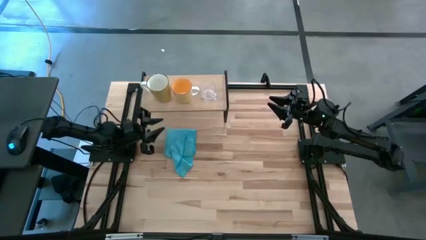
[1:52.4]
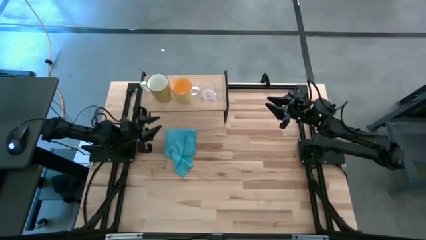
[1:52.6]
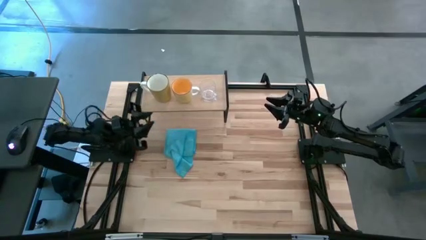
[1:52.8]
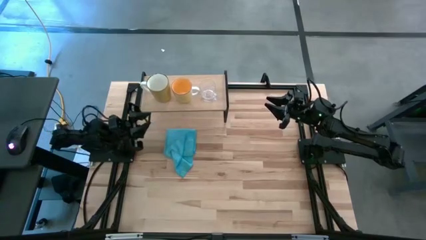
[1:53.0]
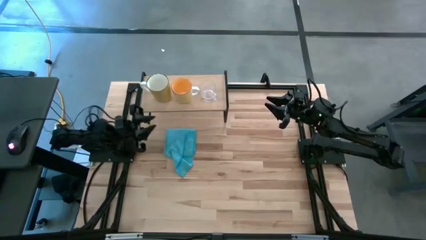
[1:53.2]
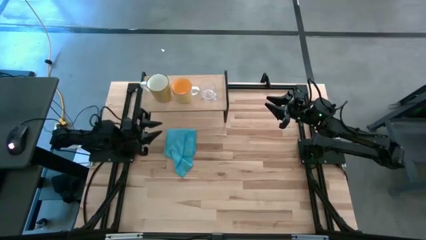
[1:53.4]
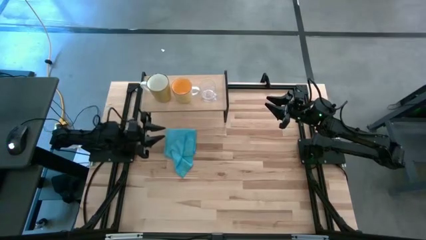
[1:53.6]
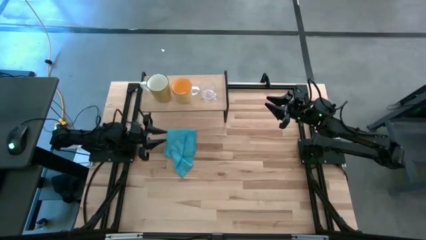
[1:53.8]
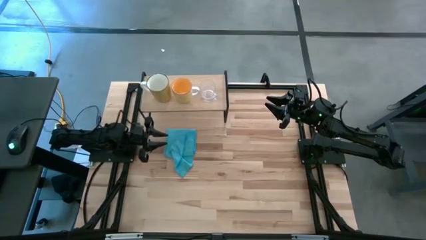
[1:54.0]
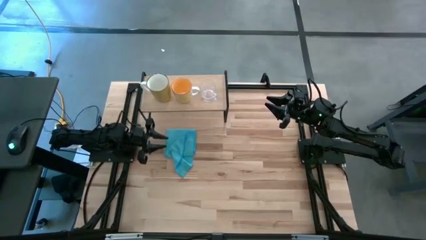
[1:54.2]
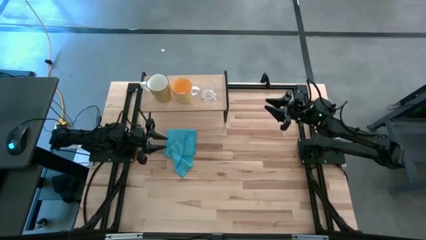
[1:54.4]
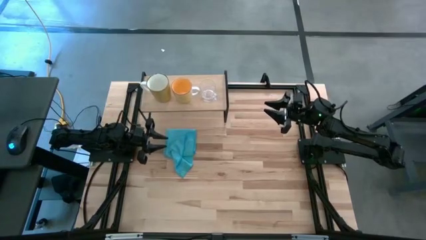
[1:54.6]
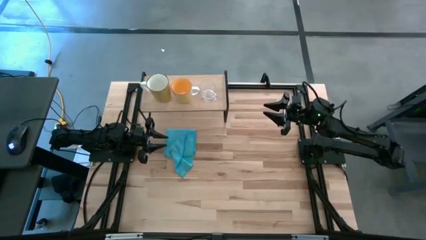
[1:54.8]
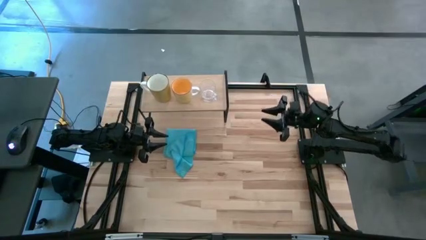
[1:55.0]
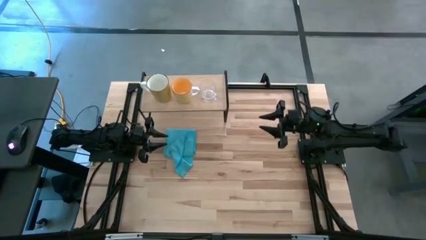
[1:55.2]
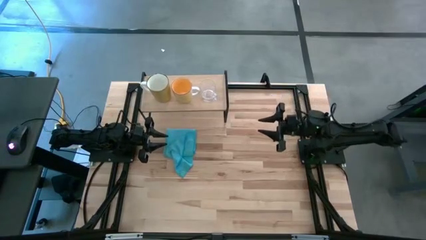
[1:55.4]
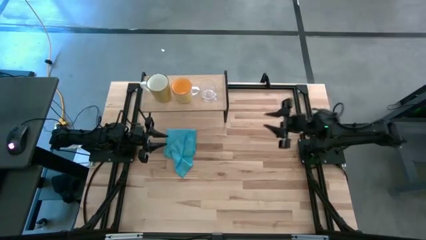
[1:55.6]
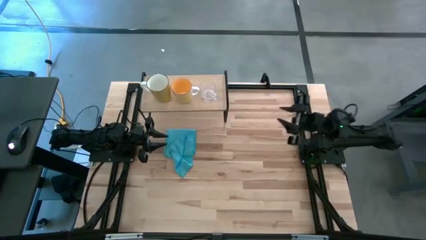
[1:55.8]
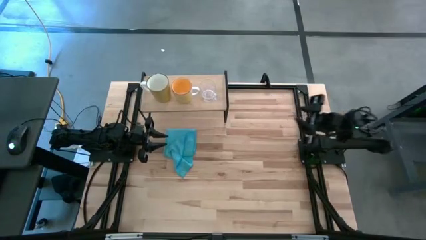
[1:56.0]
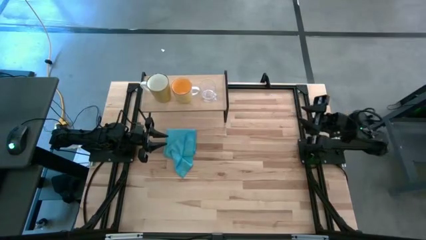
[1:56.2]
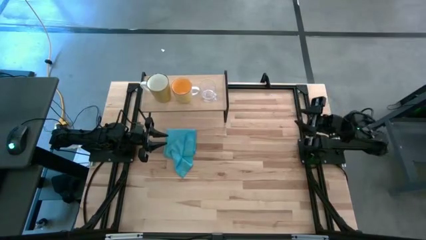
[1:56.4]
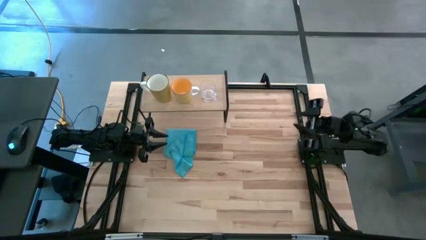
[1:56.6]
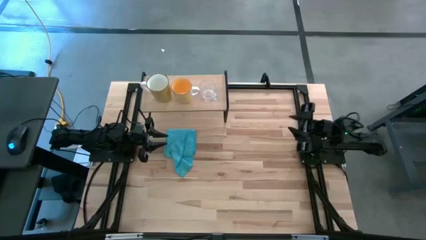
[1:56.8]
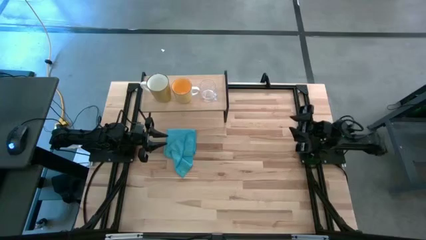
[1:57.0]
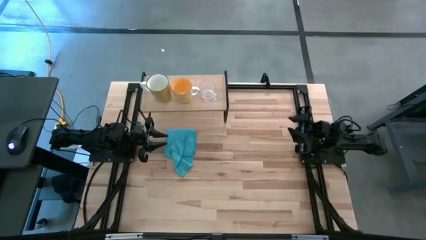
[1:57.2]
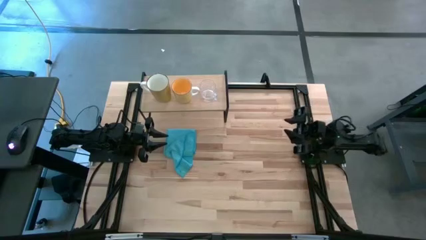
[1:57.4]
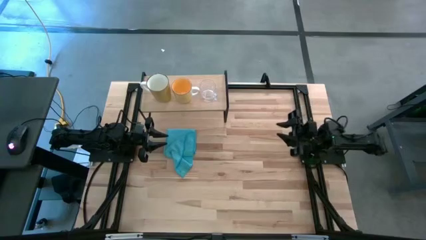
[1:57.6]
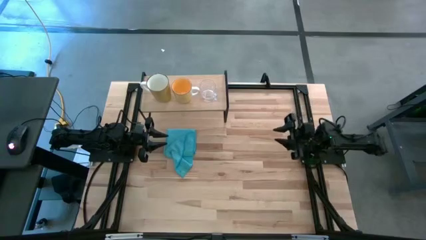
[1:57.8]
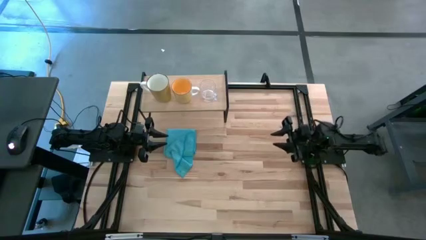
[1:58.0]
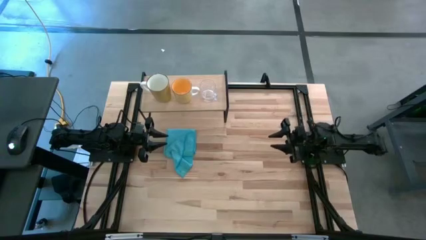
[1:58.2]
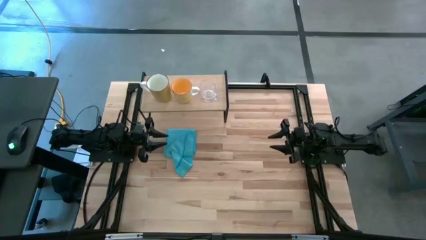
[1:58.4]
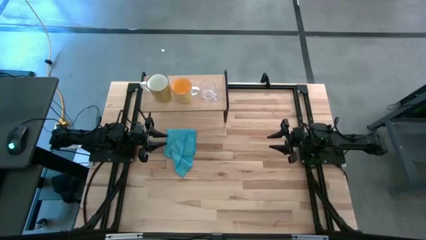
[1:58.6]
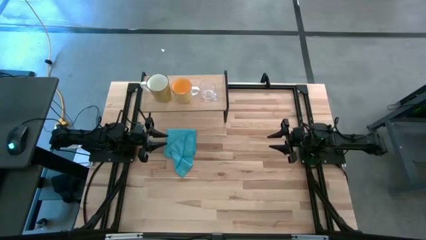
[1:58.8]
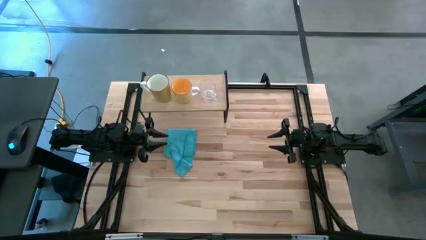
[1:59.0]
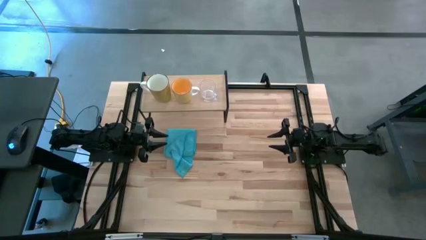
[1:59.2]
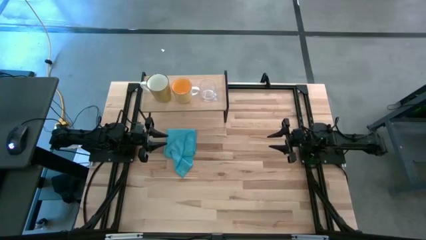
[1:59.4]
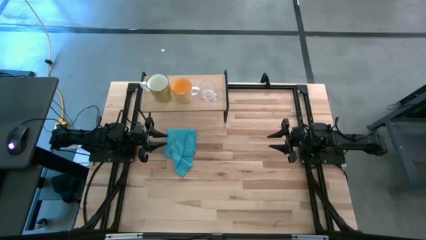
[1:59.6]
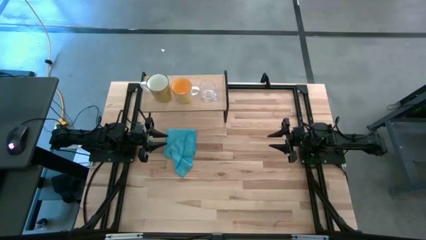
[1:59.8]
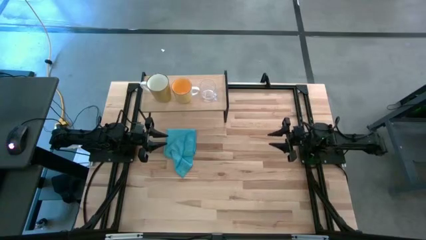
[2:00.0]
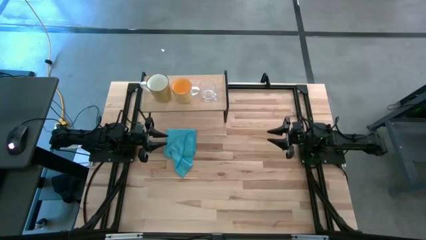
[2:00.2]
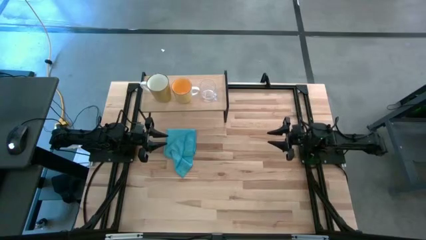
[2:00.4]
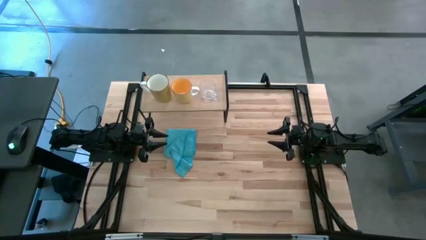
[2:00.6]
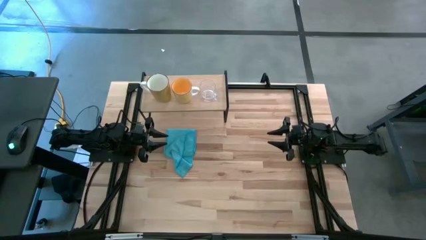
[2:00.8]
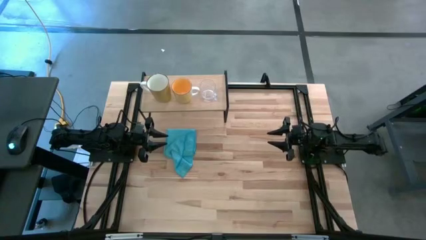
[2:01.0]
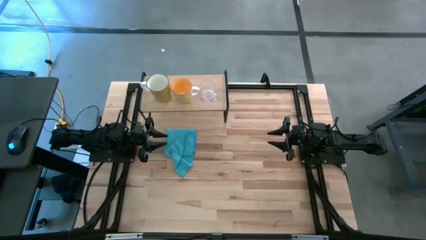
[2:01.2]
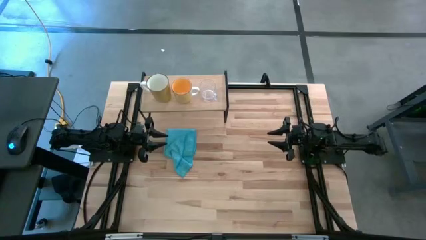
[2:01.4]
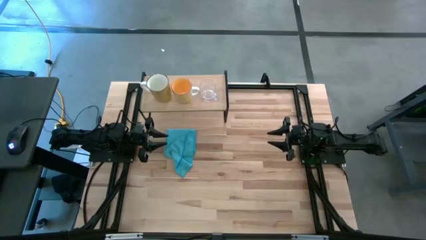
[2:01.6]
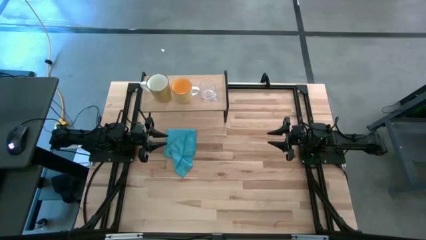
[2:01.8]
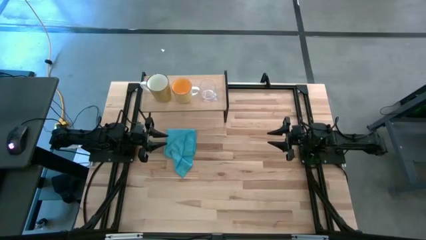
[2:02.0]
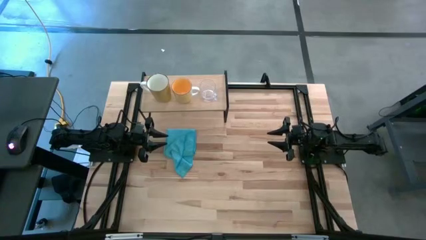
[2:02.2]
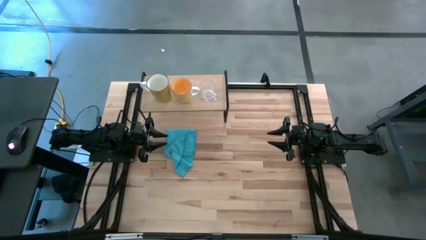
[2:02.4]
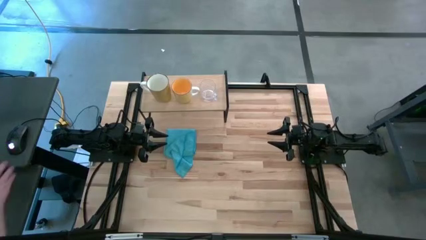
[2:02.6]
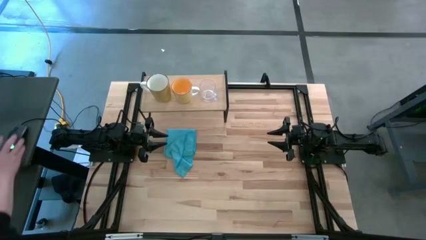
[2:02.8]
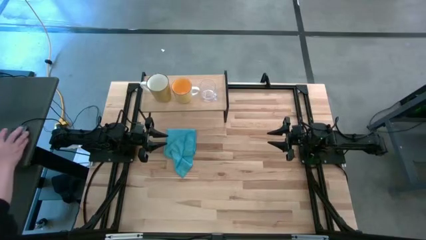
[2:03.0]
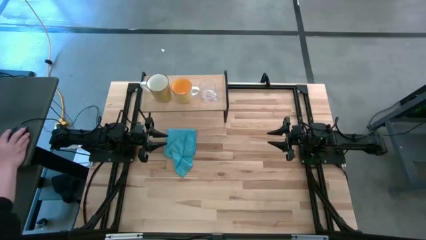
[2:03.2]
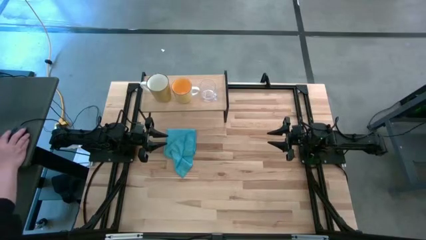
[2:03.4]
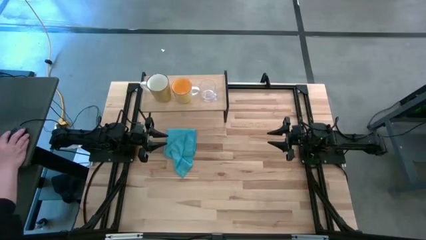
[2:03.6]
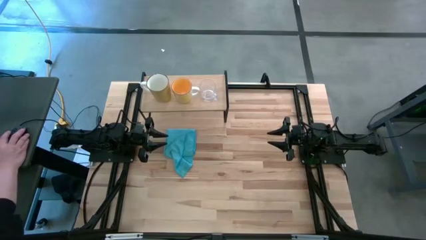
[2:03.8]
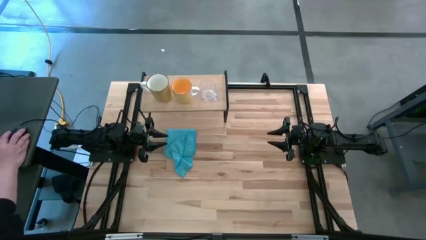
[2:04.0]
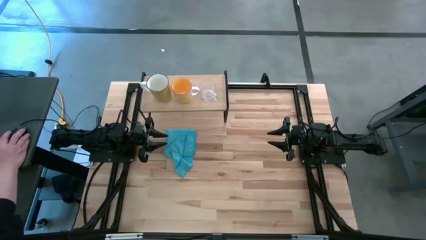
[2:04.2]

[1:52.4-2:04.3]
Task: Stack small to large cups/mugs on shelf
Return to Home Position

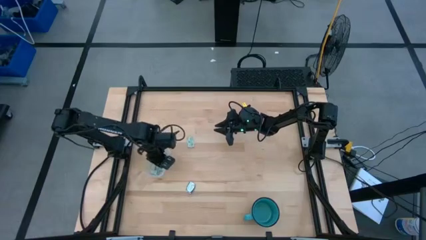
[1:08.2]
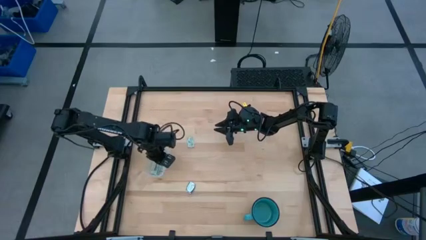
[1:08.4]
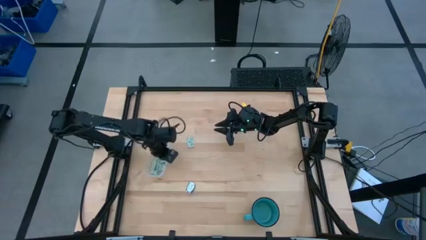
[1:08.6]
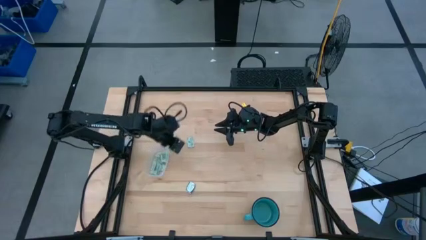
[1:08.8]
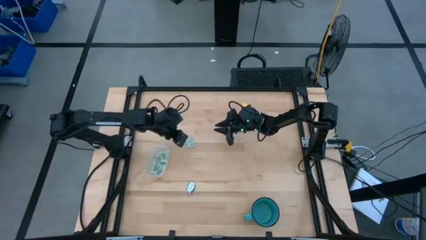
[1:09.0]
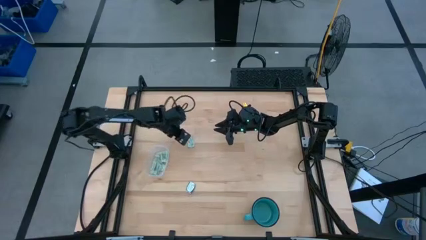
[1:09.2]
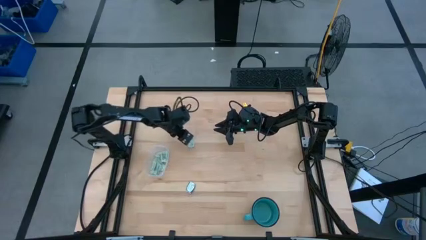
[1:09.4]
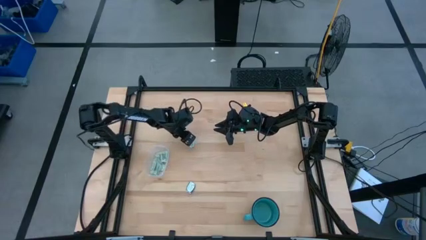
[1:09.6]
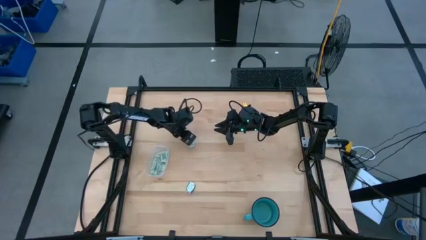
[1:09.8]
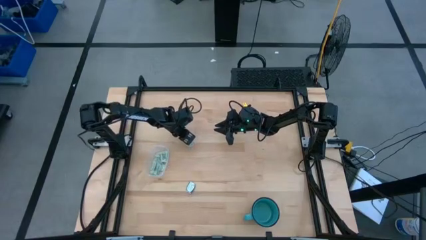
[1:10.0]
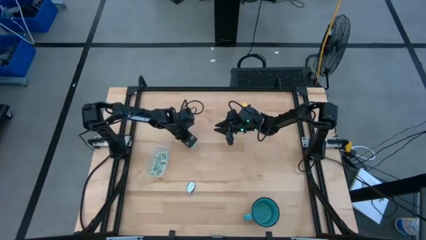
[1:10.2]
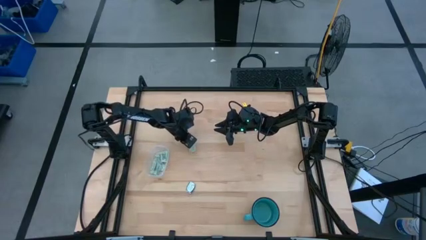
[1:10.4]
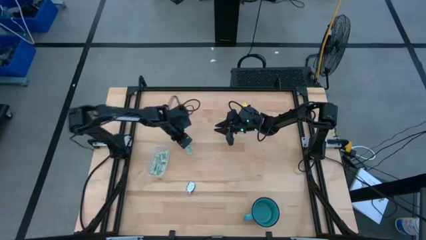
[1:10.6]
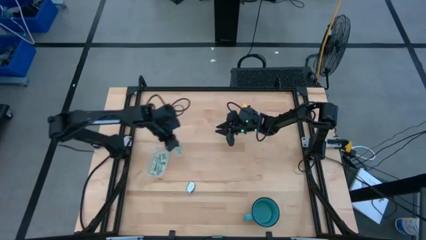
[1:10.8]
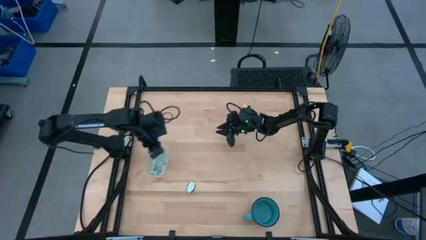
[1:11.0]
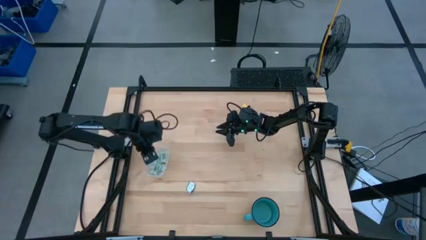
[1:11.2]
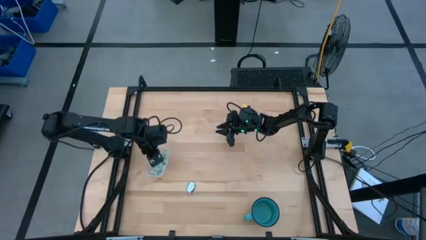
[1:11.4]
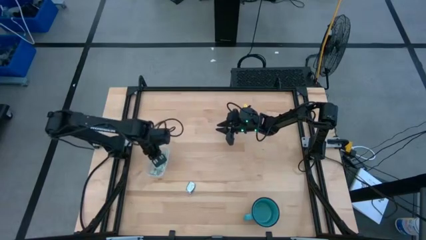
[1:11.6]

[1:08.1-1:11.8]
Task: Pick and place Stevia / Truvia into bins
Put the light green stevia packet into the transparent bin
